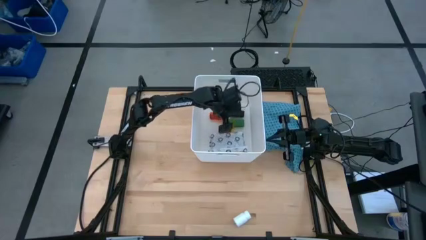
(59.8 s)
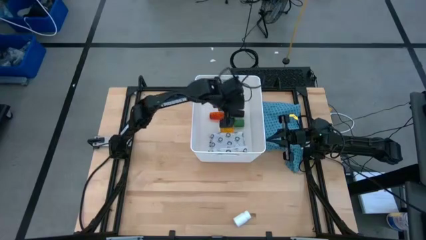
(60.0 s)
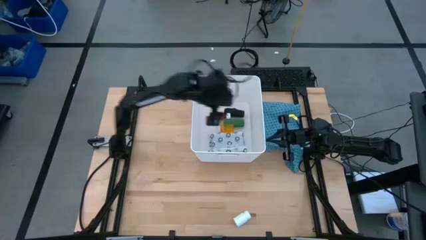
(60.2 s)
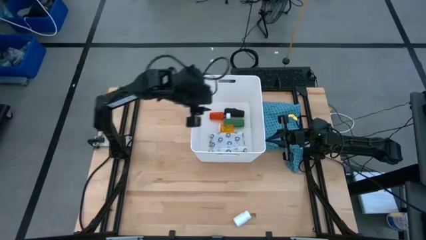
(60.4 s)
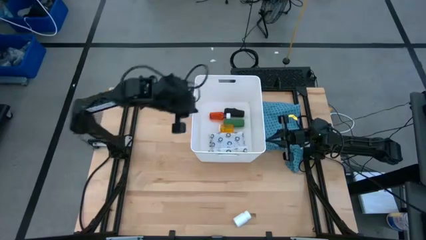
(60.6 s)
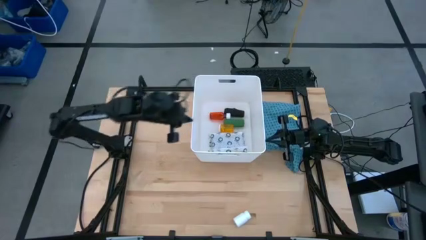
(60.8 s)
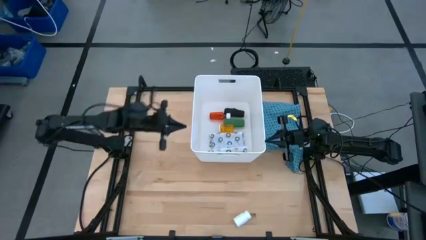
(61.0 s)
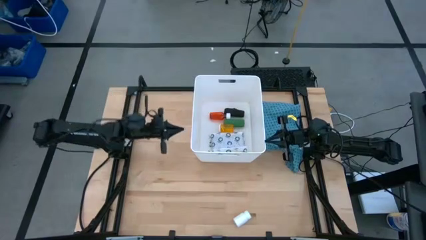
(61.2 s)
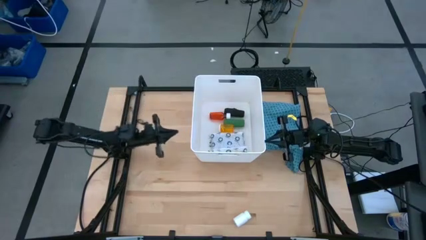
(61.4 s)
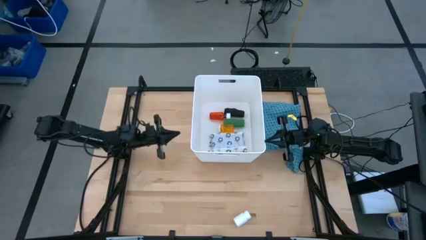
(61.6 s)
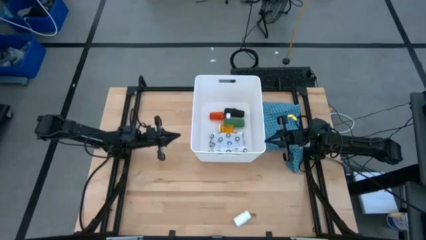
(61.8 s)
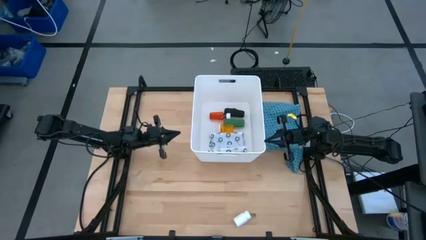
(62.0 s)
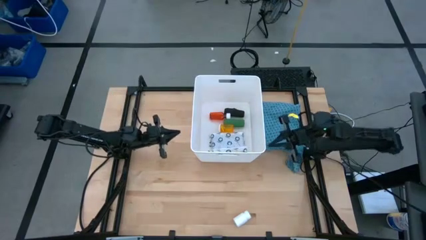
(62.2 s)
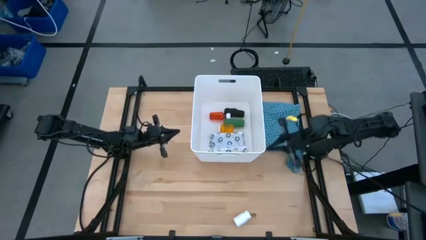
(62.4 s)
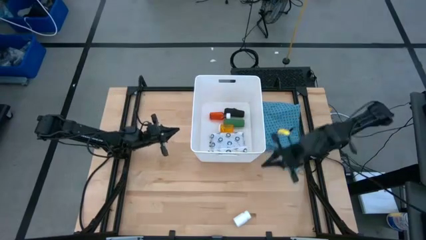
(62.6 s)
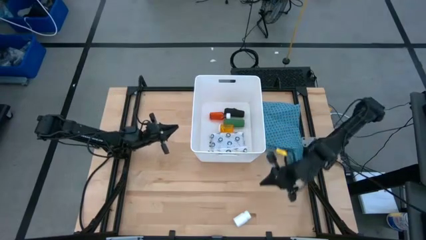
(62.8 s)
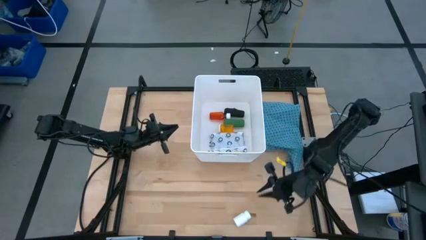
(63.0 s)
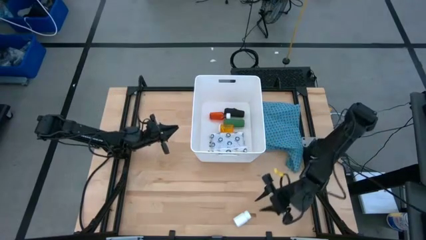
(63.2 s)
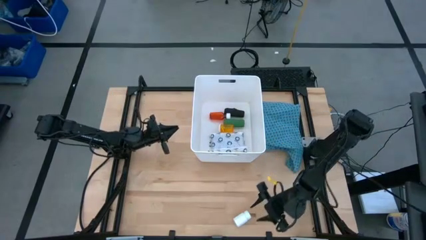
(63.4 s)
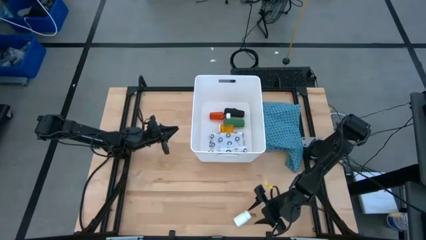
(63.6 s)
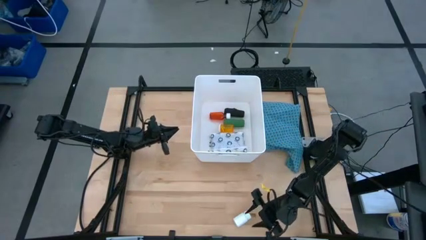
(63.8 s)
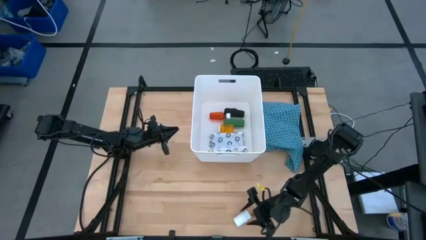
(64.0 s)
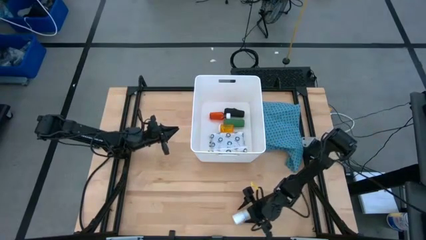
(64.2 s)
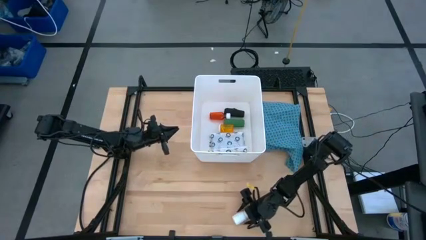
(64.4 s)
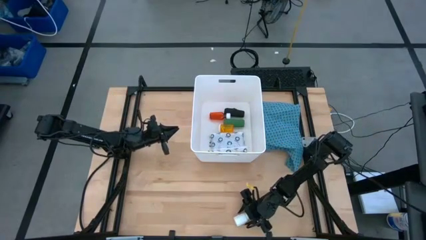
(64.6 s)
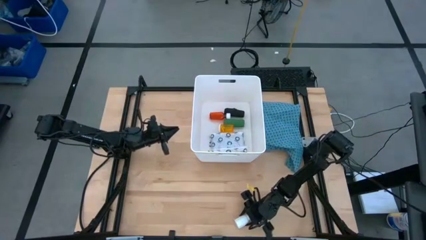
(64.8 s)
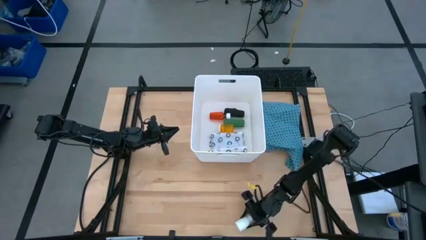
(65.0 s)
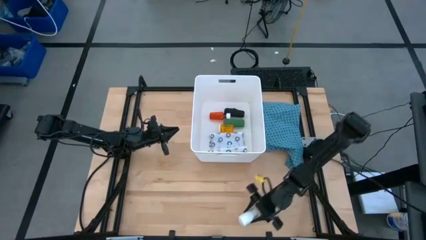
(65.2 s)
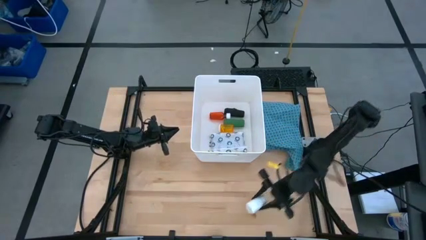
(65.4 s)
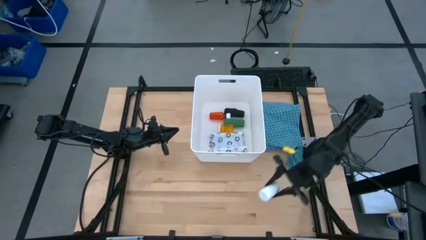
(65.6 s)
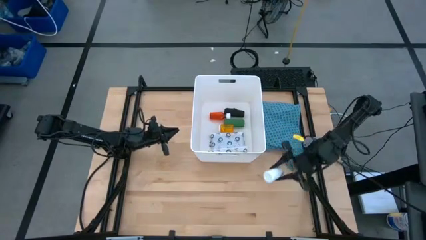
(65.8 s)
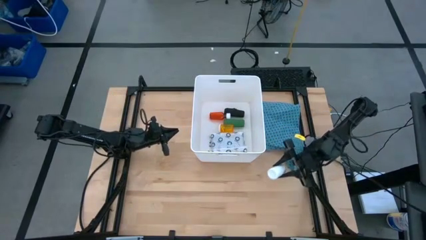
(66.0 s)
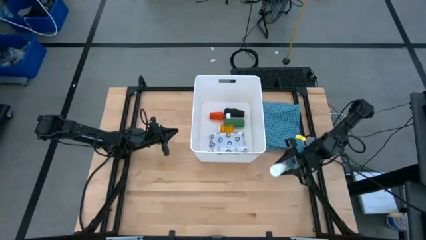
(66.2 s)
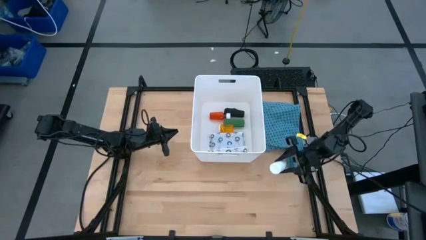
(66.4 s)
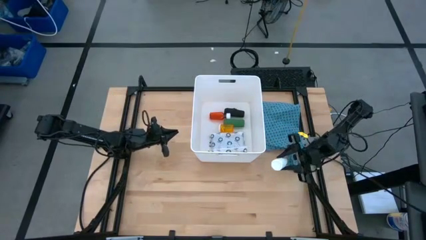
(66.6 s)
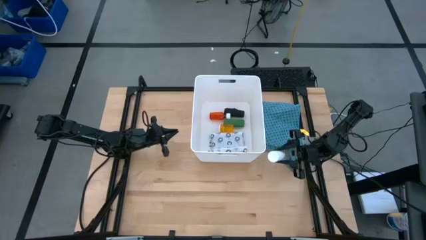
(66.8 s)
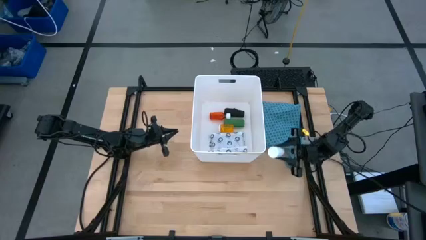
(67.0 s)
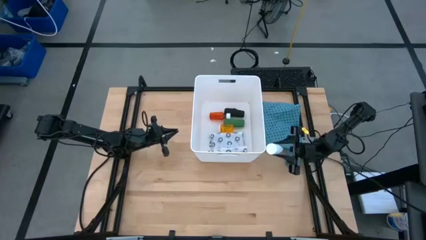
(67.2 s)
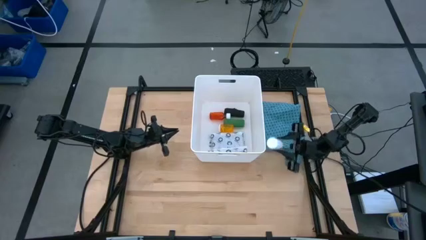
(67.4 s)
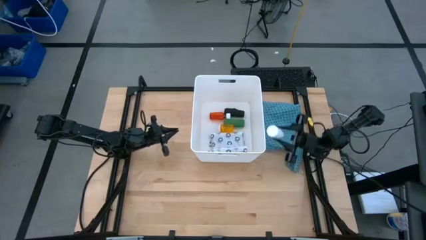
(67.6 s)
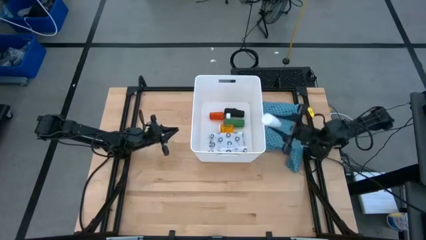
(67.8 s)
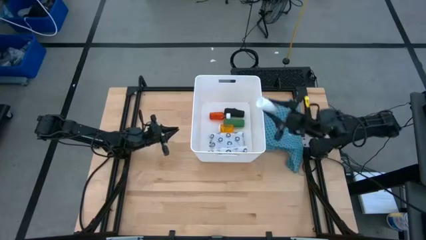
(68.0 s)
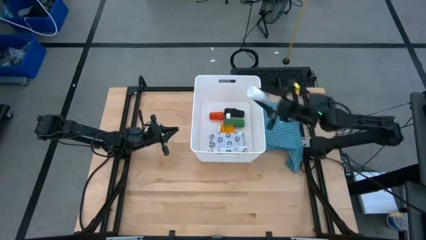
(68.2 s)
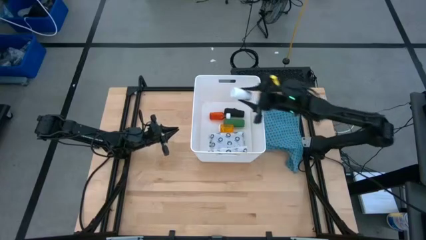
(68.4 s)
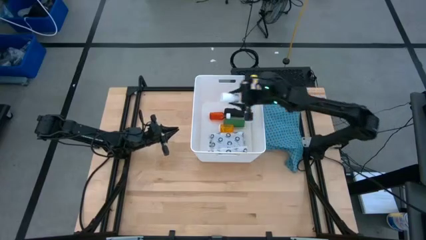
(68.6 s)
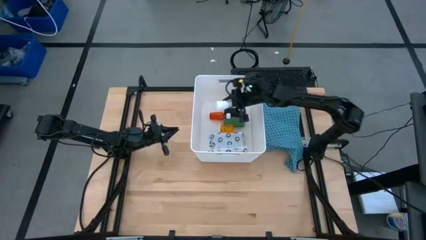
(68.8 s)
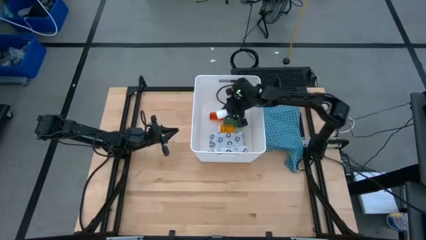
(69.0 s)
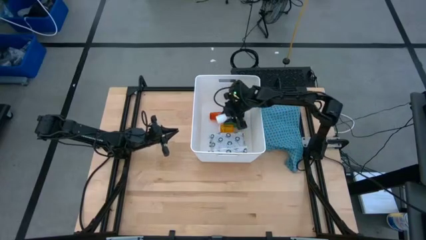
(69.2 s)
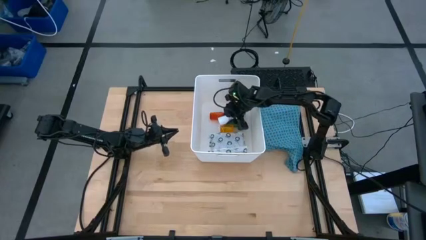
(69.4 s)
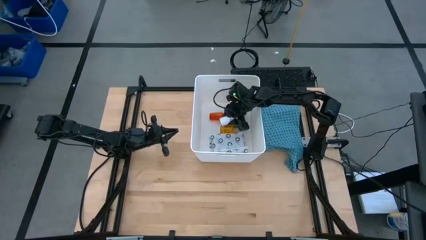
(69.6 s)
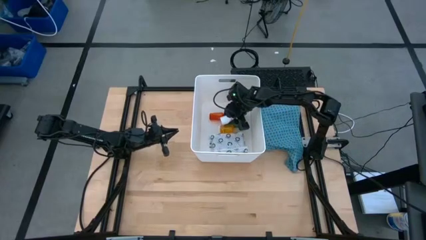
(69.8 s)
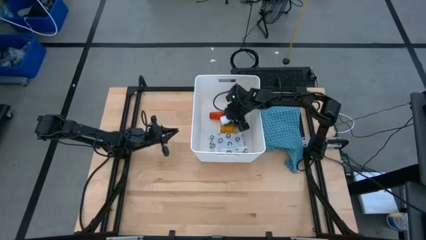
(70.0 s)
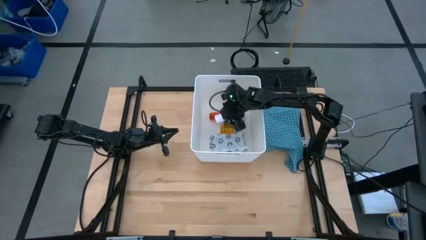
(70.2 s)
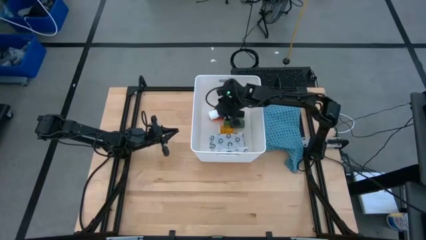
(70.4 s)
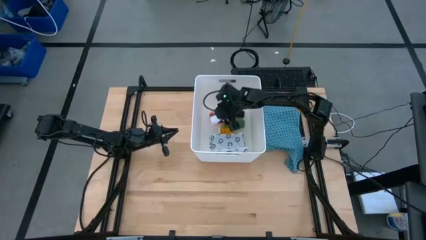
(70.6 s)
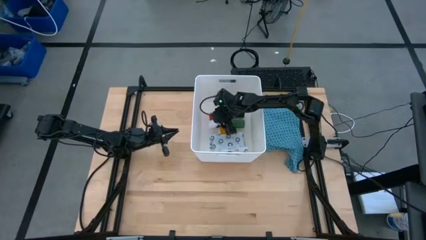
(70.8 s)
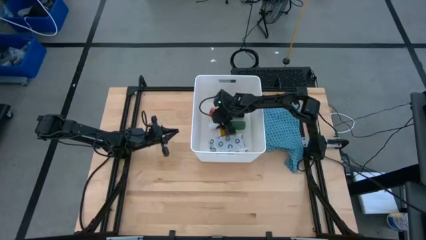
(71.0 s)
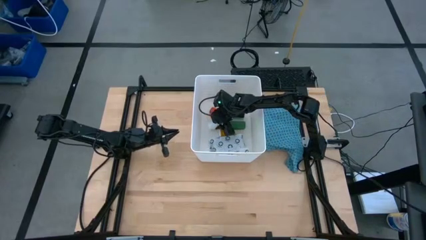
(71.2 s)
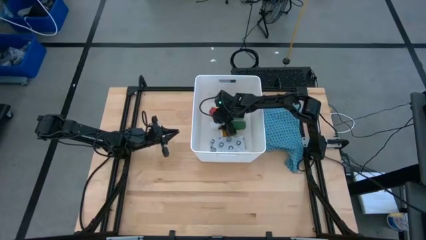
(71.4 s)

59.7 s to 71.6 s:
Task: Pick & place medical supplies in basket/bin
Put the white medicine bottle into the white bin
